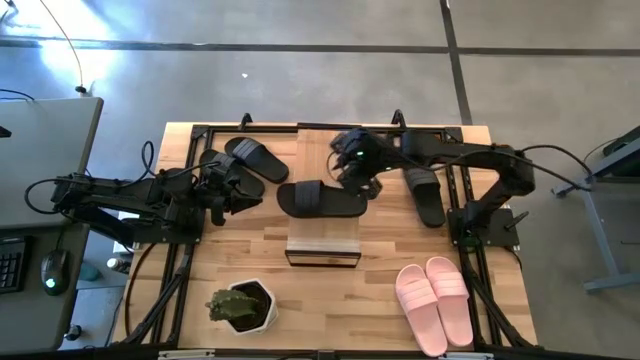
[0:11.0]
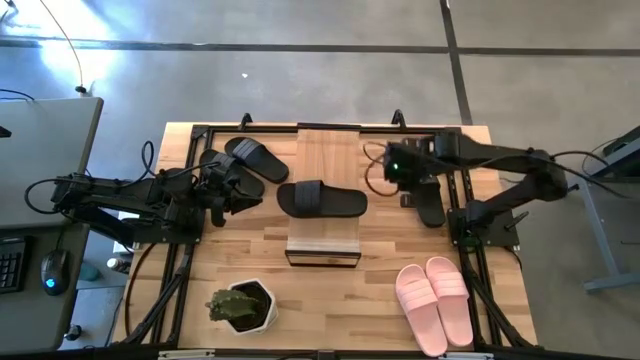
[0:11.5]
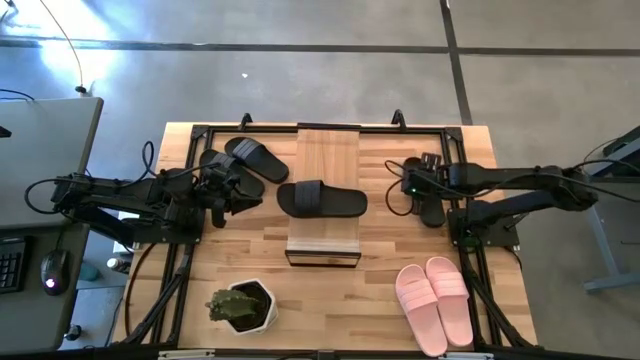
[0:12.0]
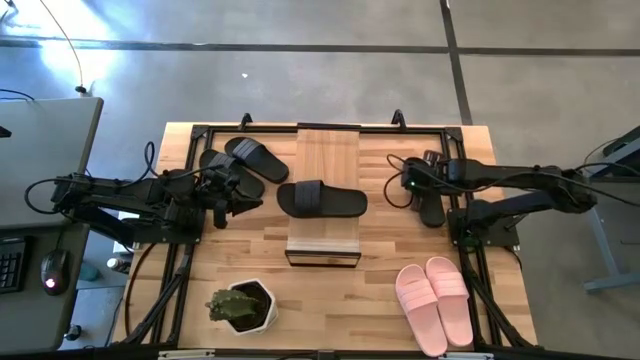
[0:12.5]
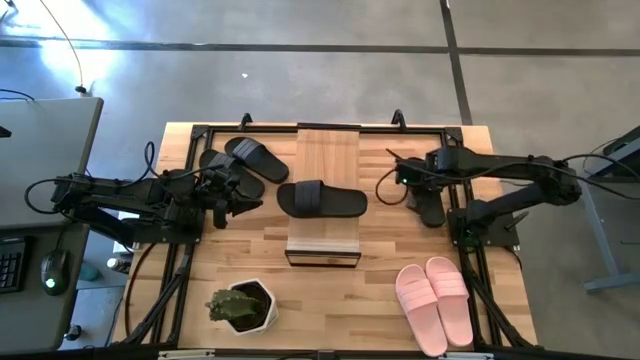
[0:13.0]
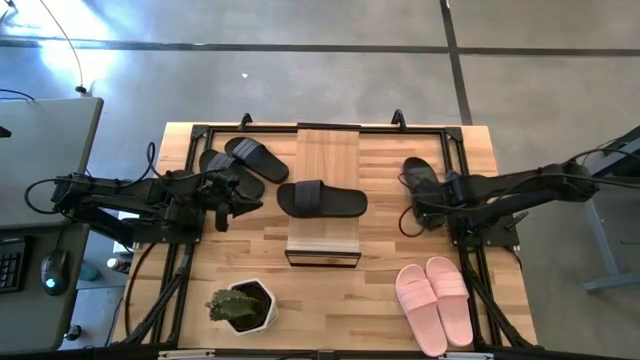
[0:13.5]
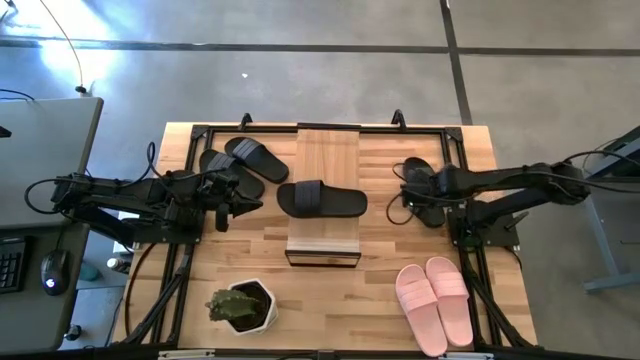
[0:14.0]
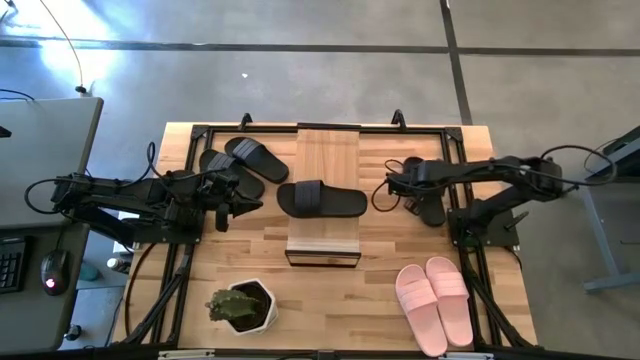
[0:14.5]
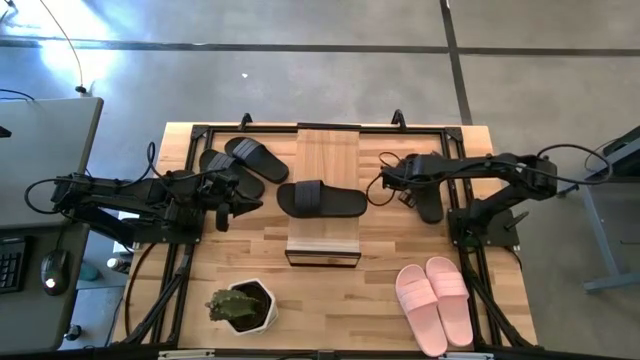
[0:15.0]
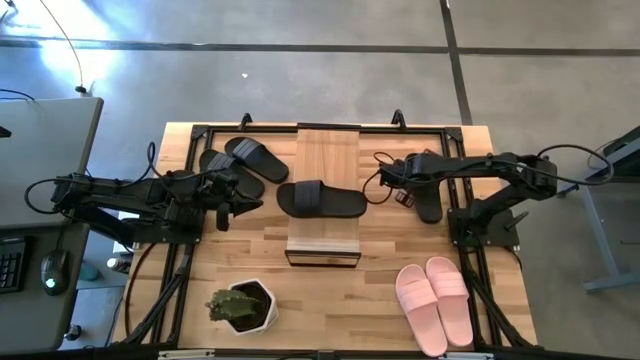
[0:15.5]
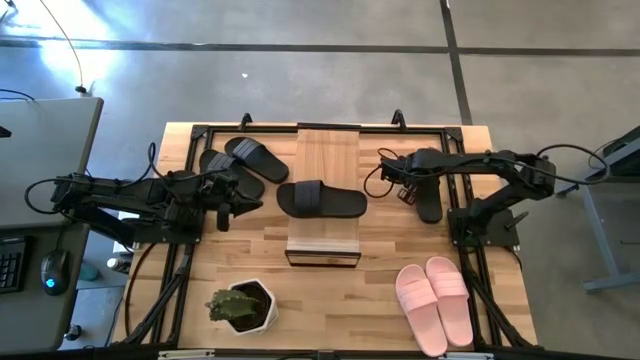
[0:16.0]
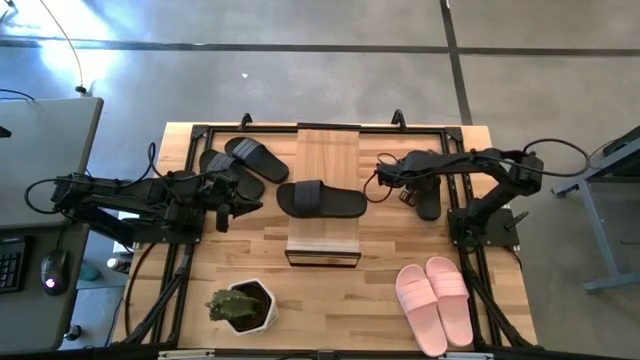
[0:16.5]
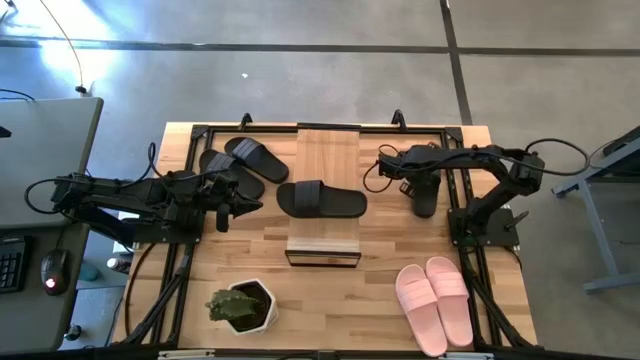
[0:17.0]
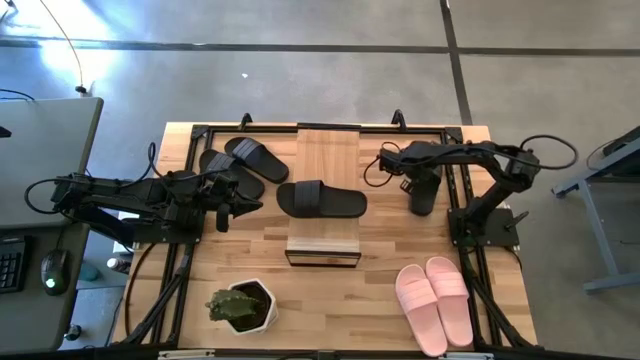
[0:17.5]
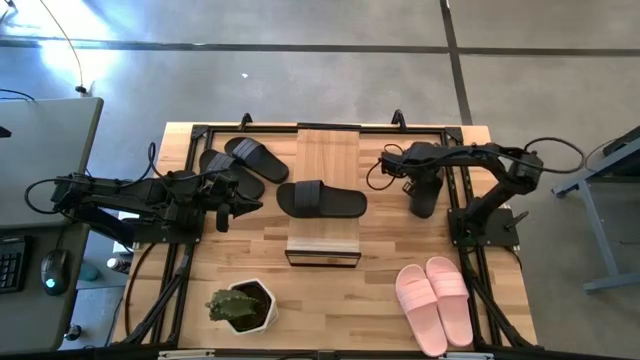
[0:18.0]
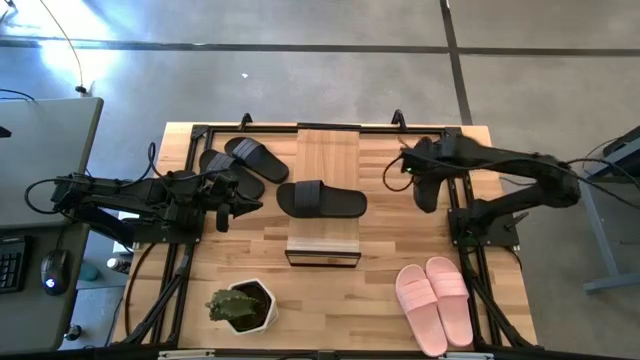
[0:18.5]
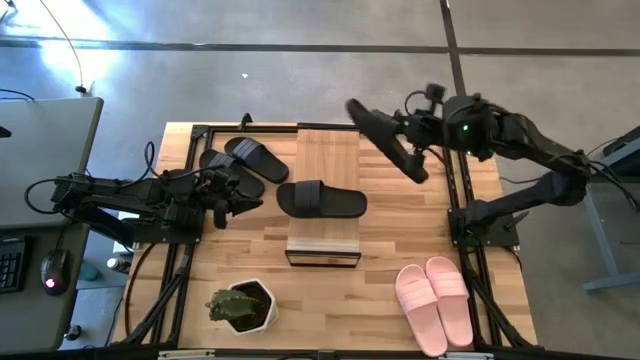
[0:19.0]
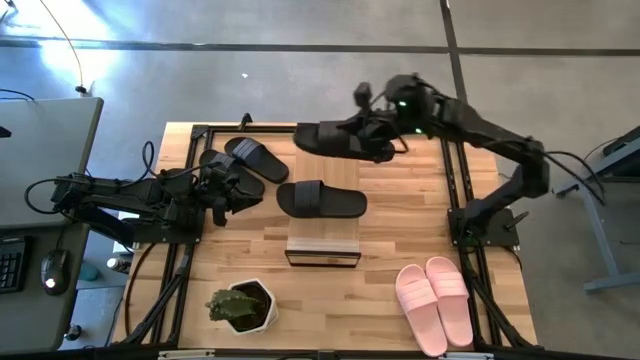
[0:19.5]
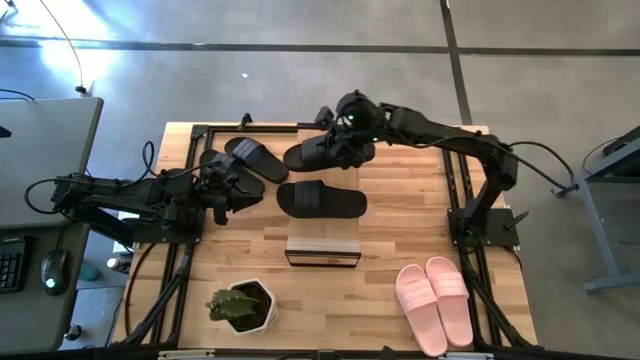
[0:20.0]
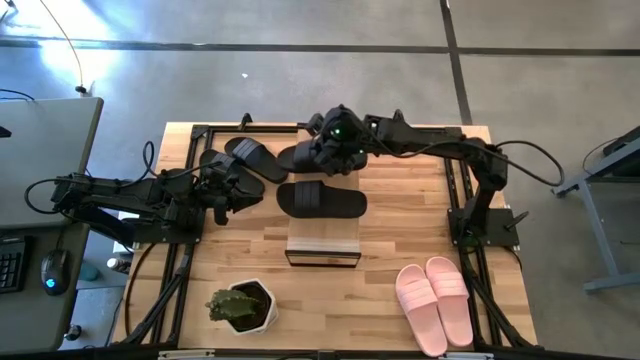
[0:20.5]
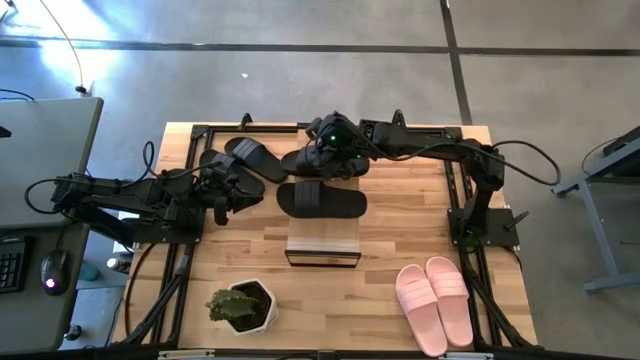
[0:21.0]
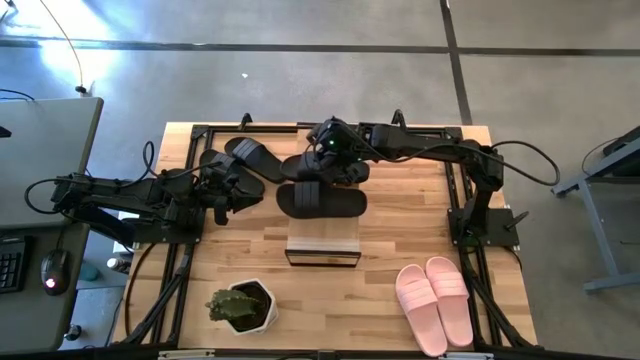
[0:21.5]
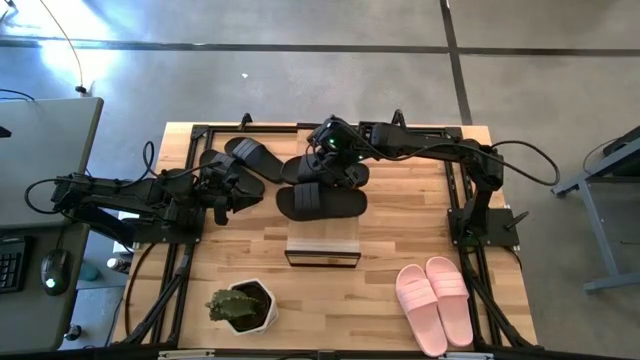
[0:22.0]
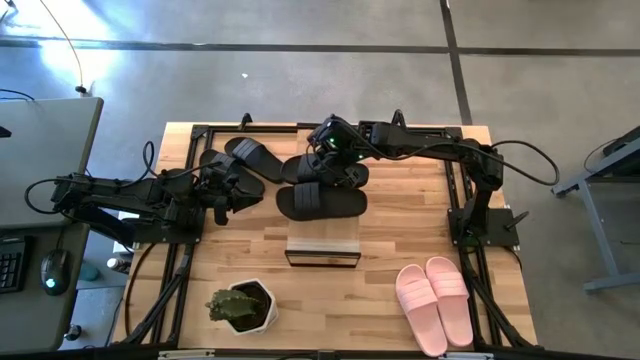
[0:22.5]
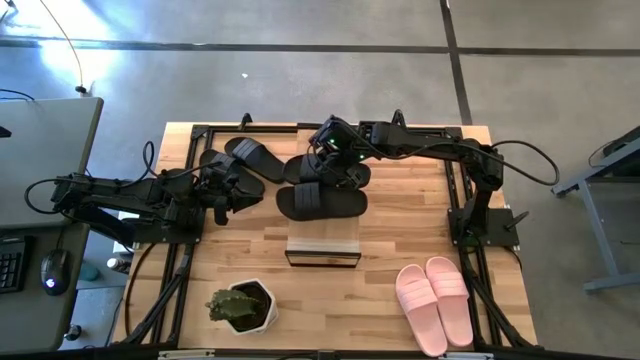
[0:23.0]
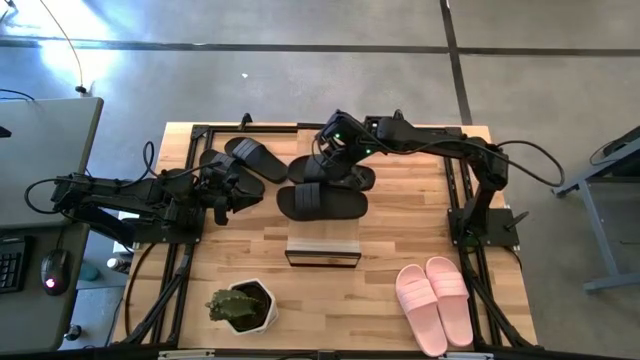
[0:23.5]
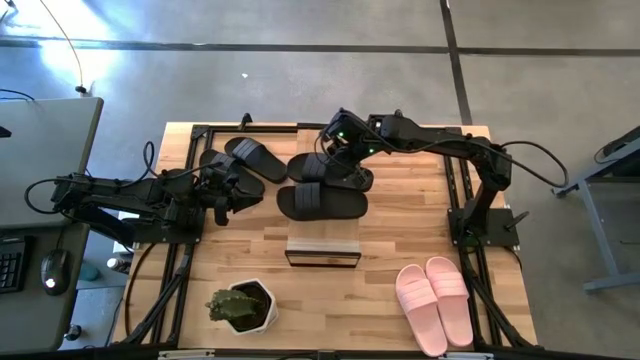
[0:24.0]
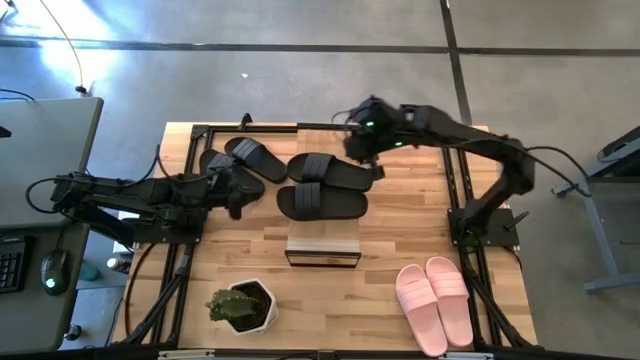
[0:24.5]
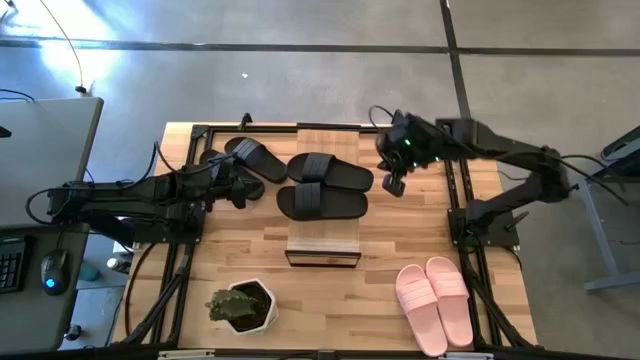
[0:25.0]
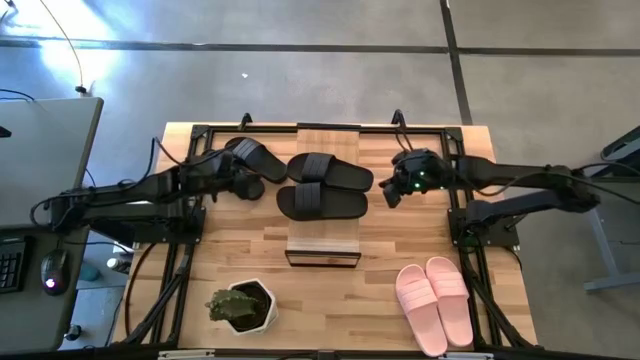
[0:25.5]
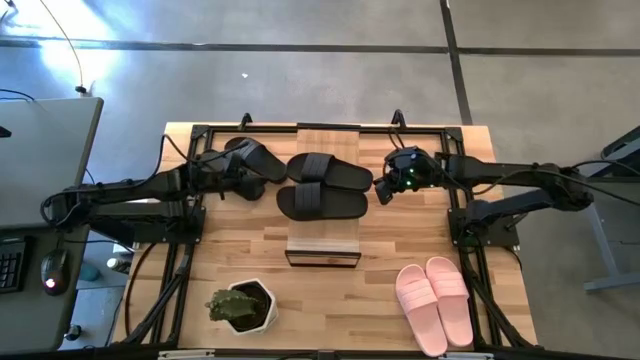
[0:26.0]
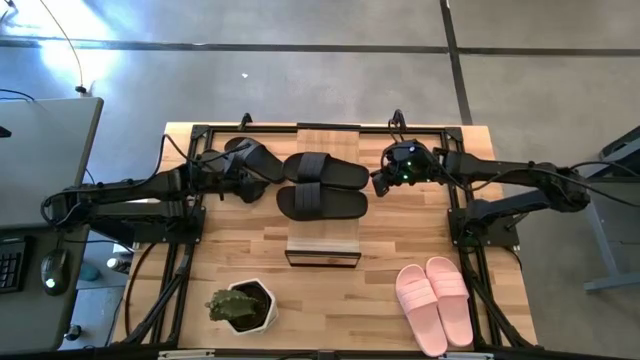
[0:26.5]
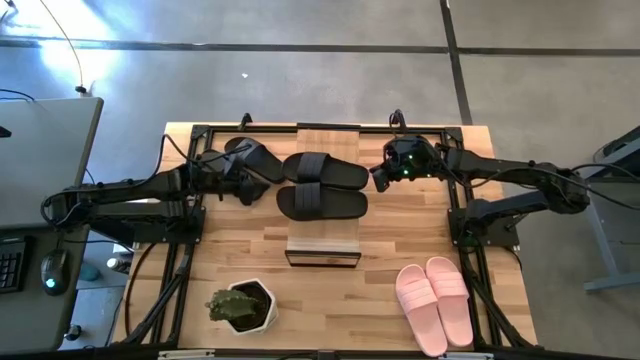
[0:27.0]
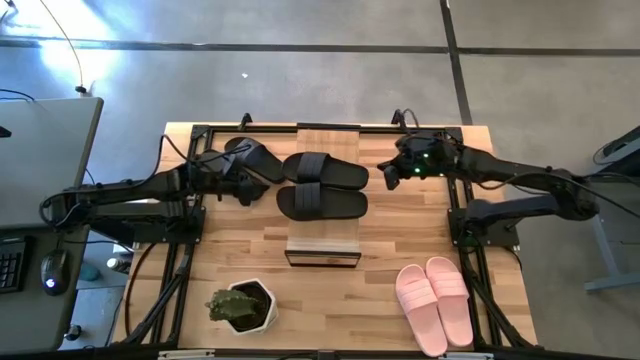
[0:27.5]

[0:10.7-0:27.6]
Task: Pick and place slides into the shelf
Put the black slipper on the shelf

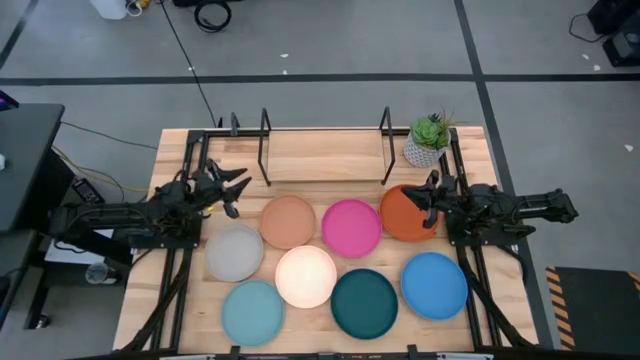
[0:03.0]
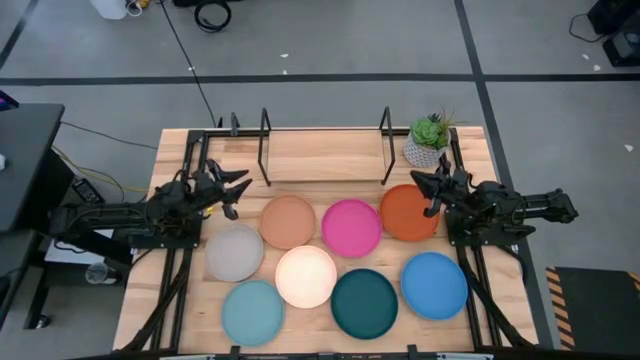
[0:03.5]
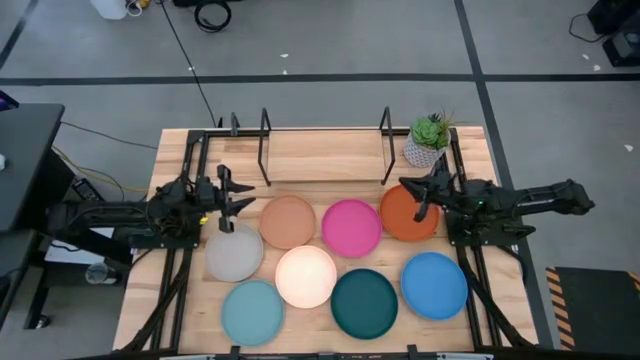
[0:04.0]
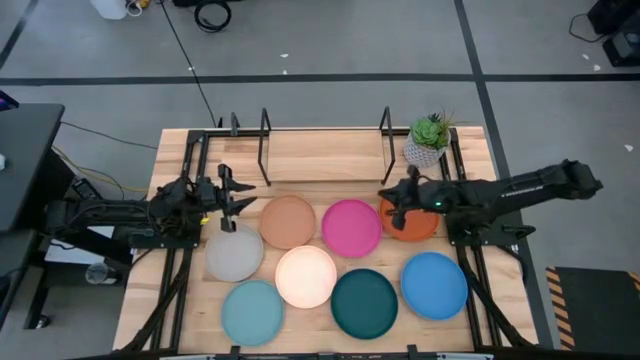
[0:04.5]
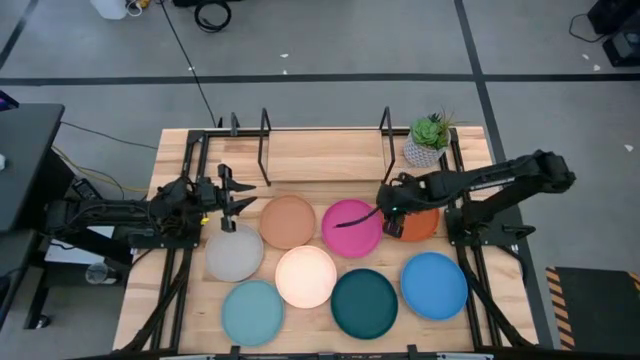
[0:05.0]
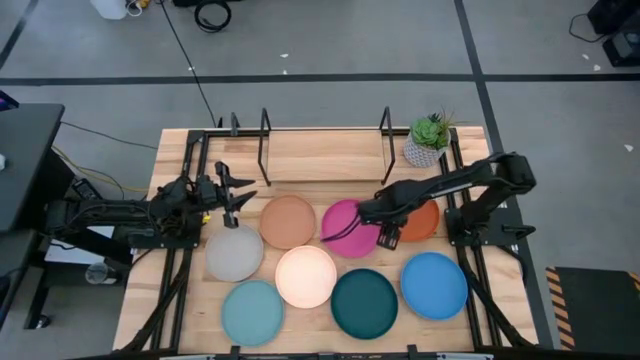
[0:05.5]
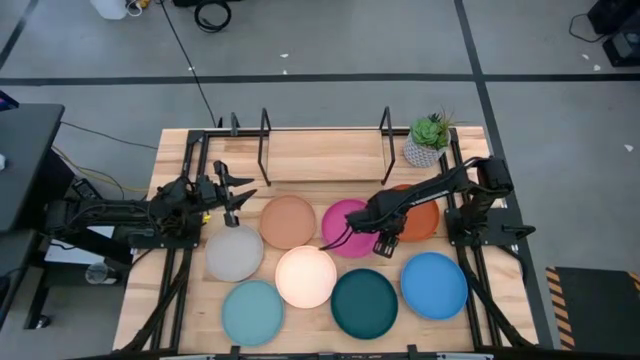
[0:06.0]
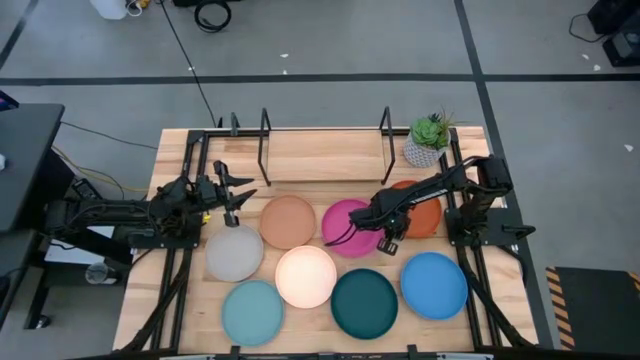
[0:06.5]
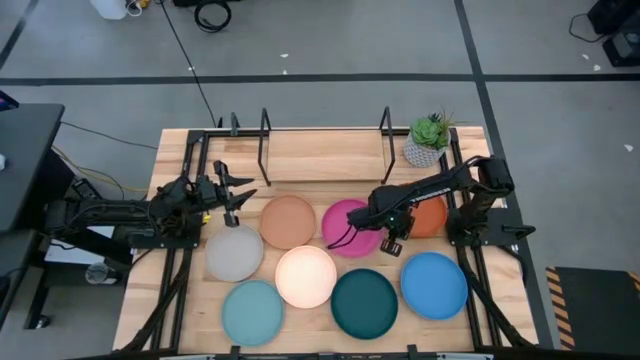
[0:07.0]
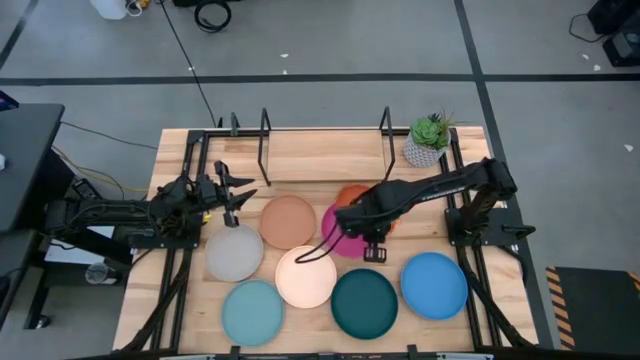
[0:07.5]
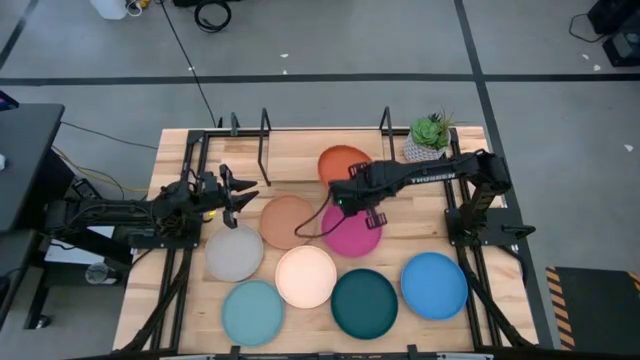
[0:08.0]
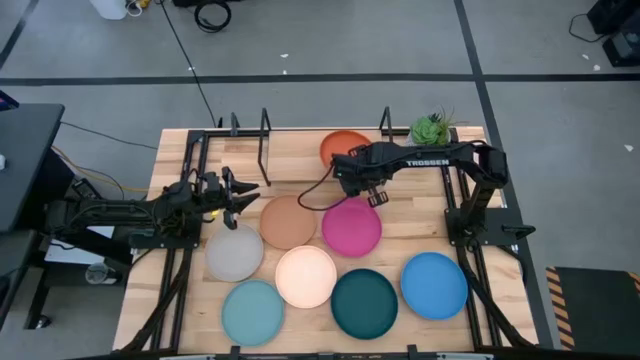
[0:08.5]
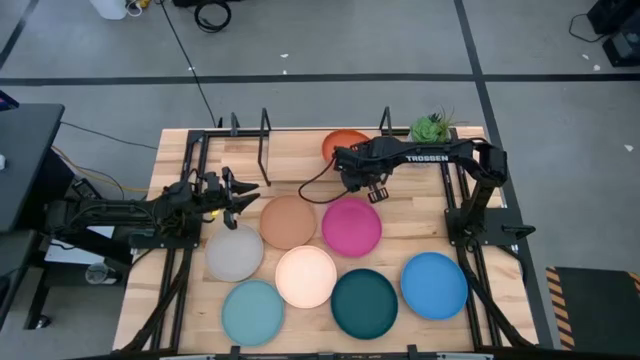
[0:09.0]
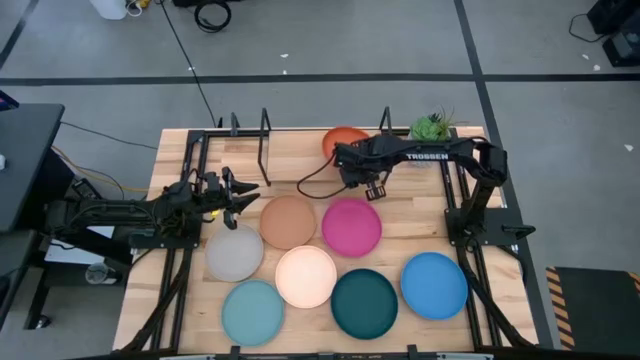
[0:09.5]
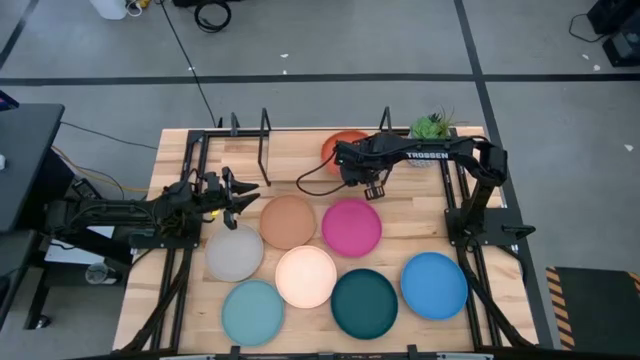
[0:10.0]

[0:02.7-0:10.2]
Task: Place and stack plates onto a shelf
Put the orange plate on the shelf
